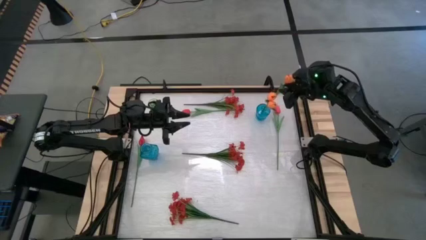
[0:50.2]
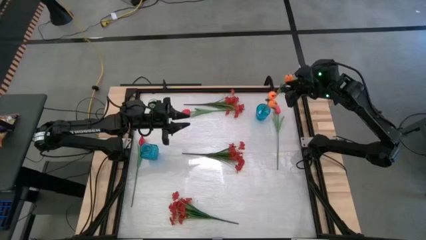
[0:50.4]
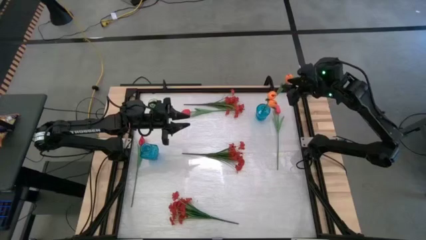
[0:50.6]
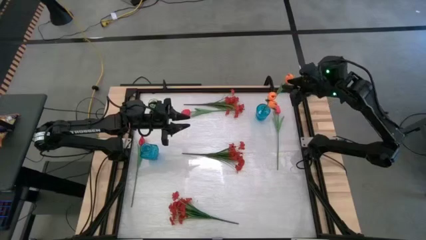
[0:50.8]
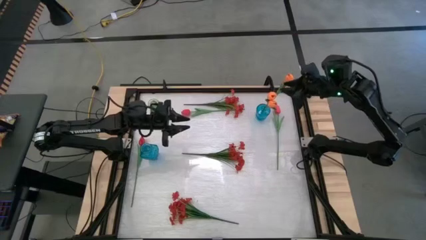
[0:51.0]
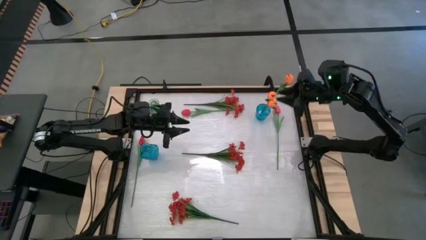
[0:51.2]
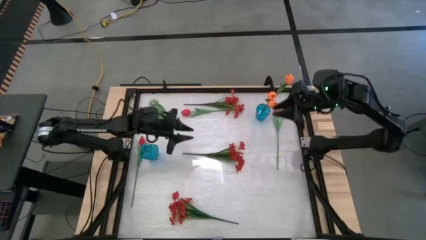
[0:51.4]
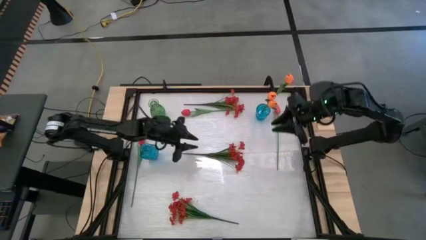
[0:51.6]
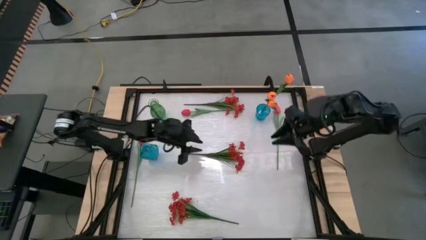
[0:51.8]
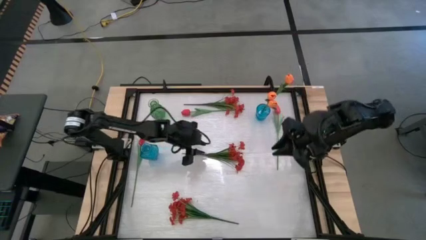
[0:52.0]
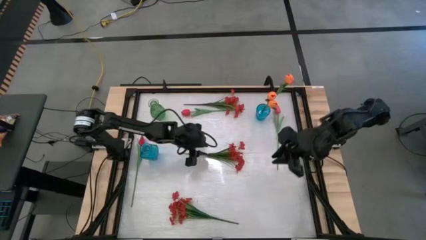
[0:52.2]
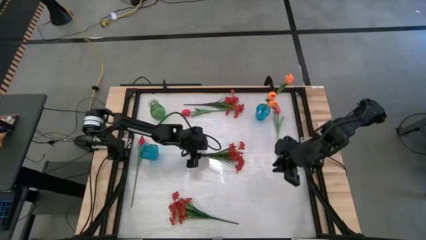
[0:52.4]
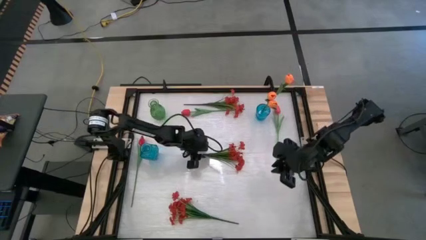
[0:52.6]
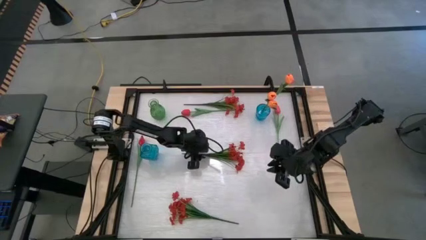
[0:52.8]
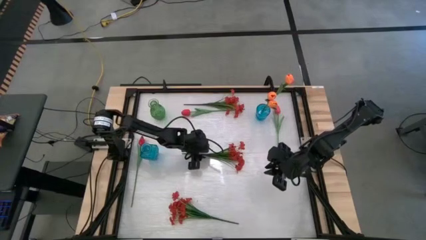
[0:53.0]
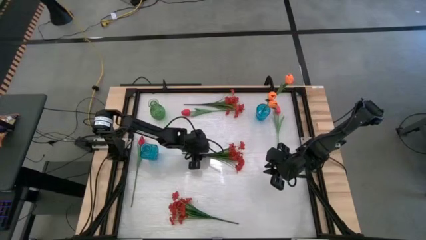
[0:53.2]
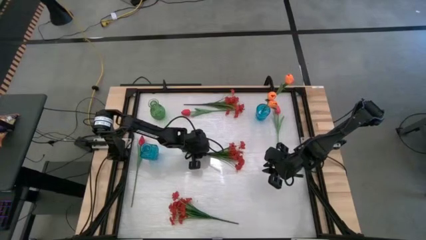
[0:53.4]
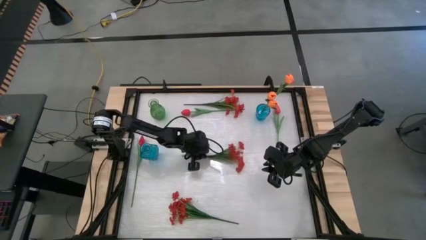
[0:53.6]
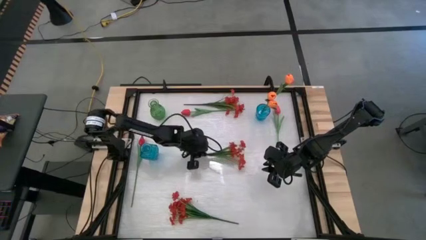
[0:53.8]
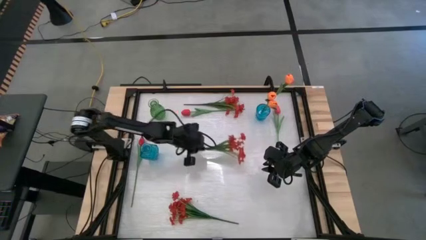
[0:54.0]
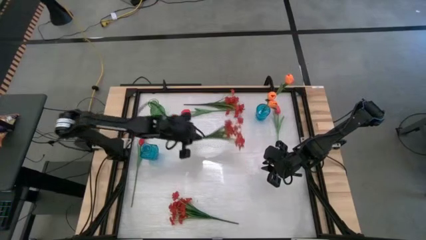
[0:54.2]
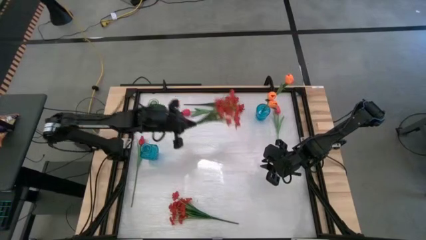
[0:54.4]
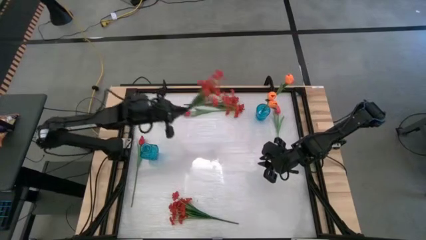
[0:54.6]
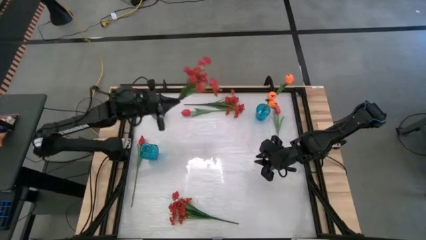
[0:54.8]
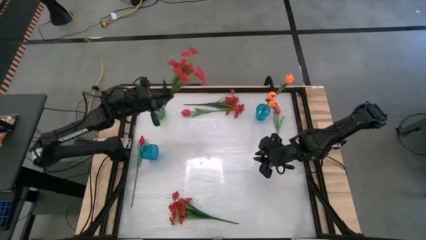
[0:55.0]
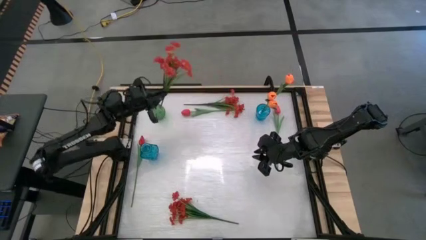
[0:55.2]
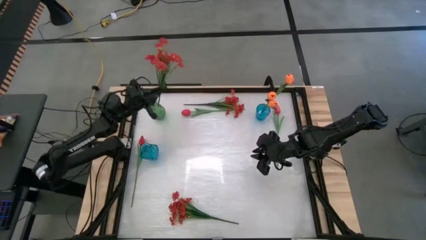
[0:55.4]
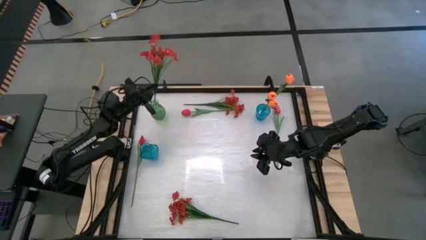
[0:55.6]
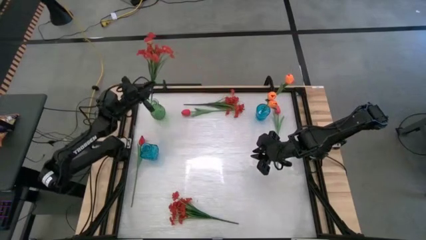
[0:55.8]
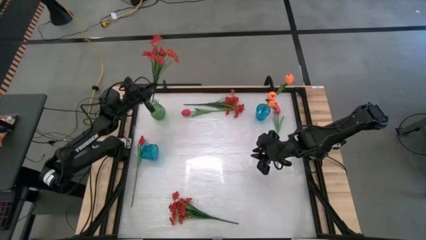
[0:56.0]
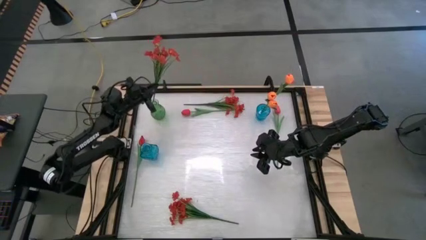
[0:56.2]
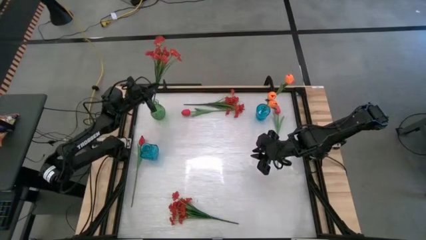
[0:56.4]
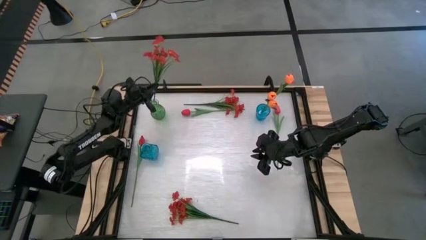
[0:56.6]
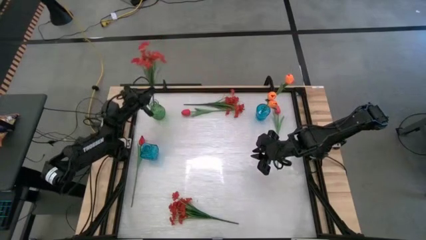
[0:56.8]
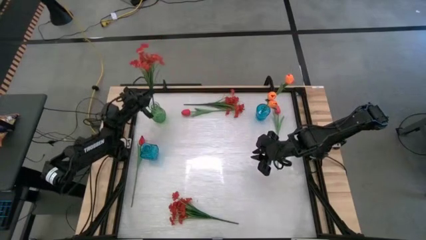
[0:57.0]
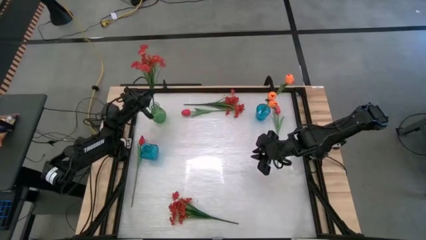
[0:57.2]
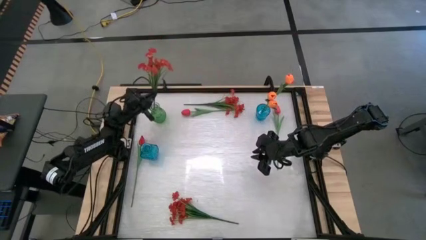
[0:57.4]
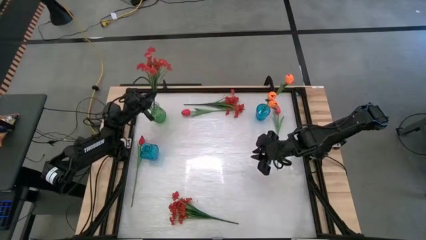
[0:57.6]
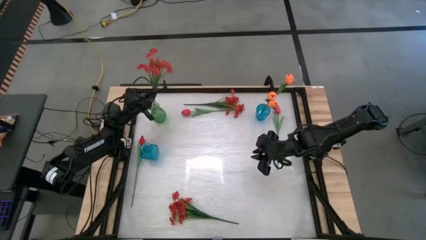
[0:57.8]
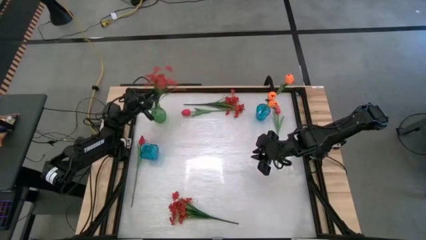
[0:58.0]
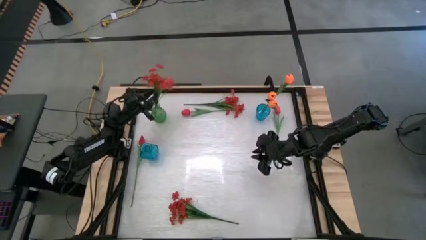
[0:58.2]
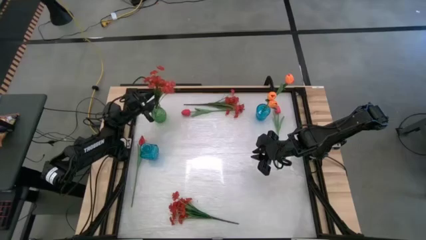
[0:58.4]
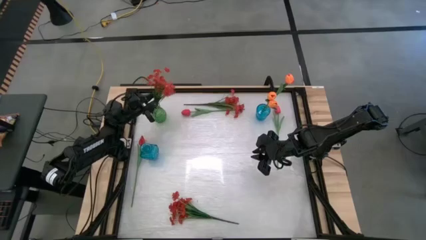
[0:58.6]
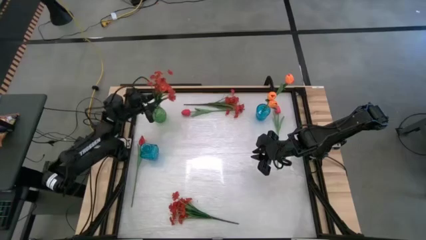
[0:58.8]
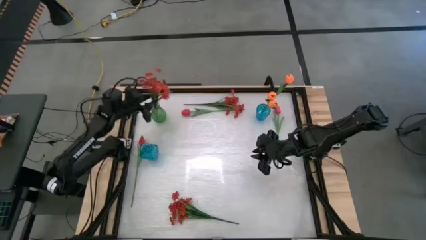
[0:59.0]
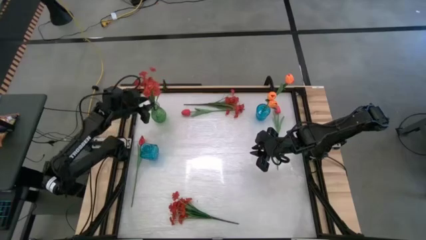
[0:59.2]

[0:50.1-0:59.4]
Task: Sort flowers into vase by color
Put the center red flowers into the green vase

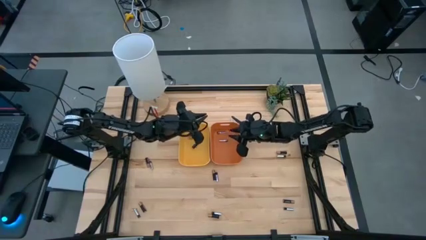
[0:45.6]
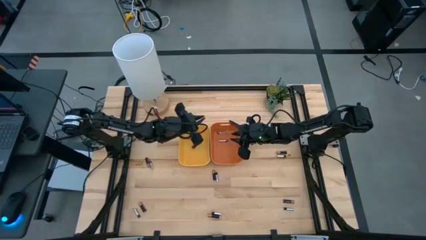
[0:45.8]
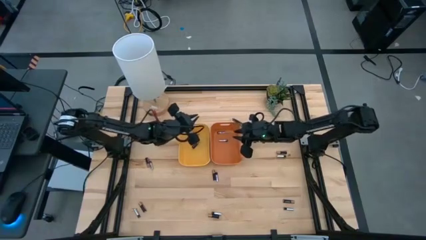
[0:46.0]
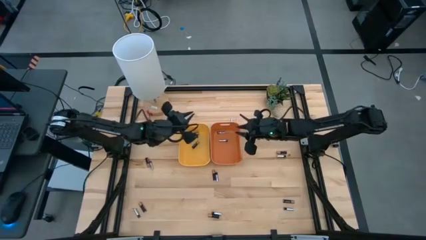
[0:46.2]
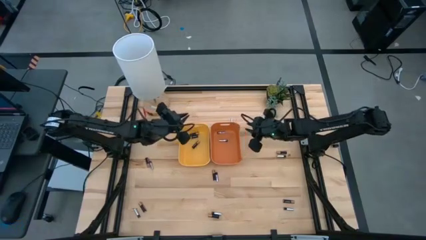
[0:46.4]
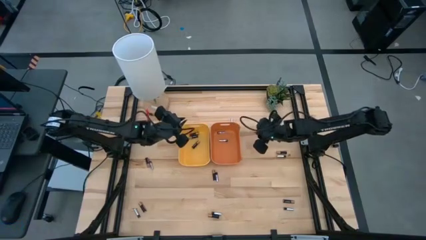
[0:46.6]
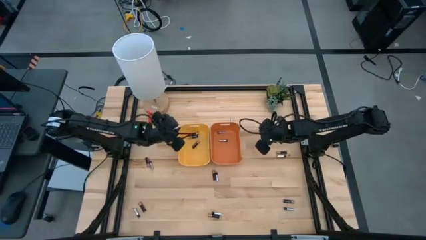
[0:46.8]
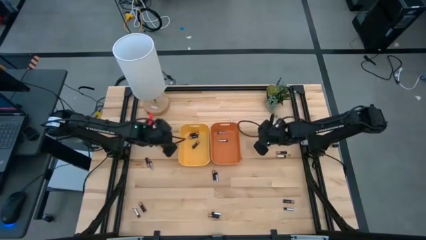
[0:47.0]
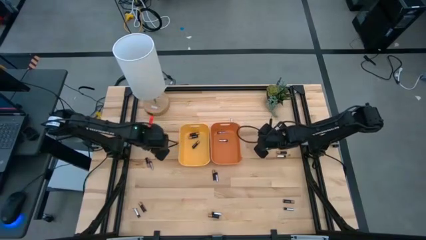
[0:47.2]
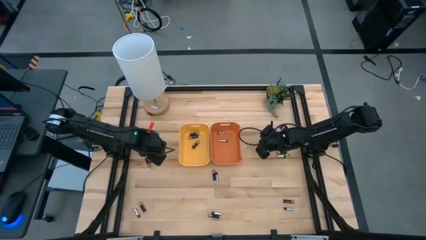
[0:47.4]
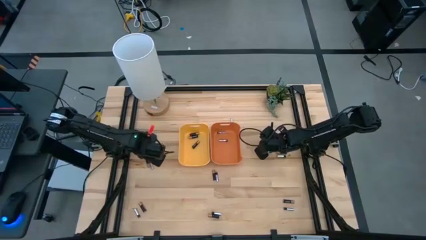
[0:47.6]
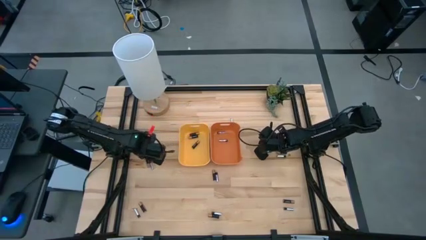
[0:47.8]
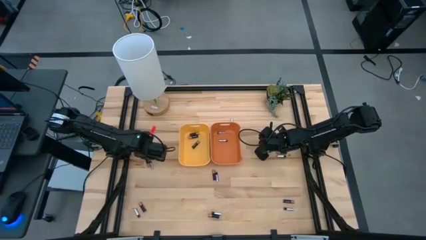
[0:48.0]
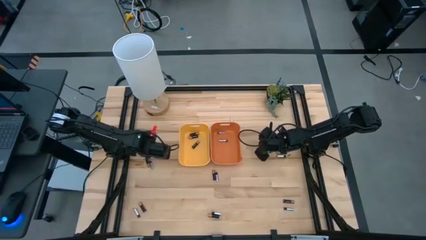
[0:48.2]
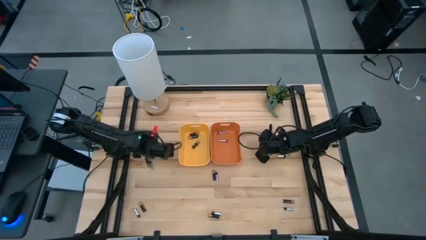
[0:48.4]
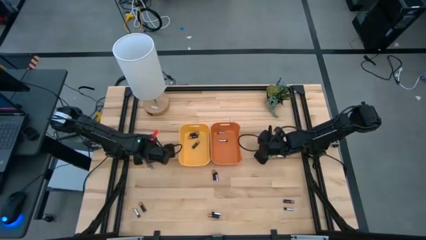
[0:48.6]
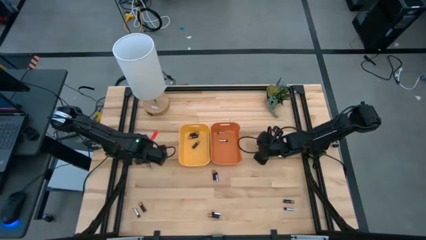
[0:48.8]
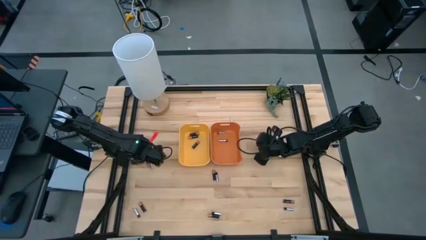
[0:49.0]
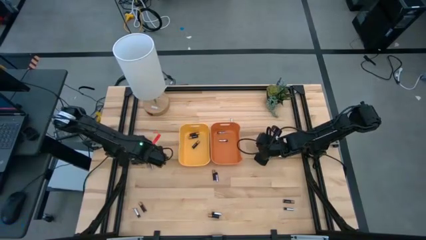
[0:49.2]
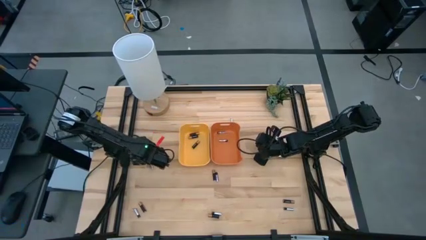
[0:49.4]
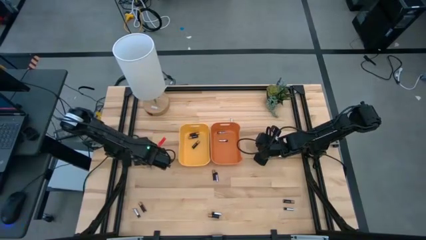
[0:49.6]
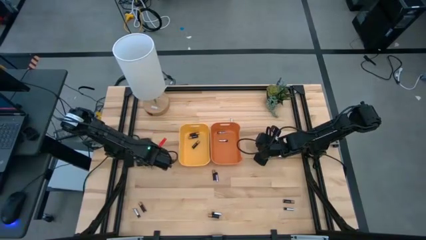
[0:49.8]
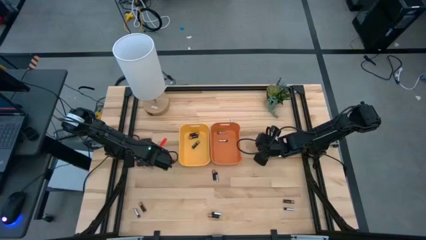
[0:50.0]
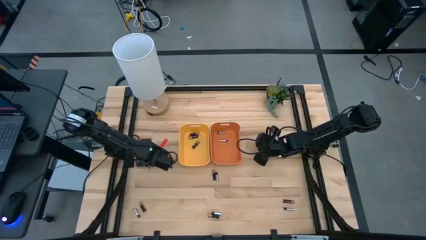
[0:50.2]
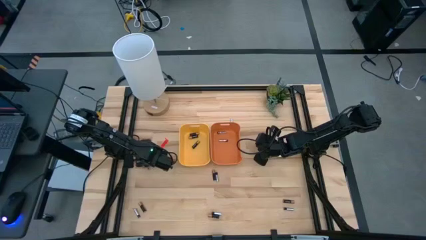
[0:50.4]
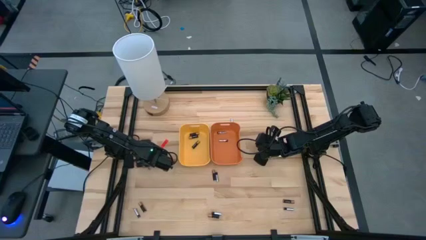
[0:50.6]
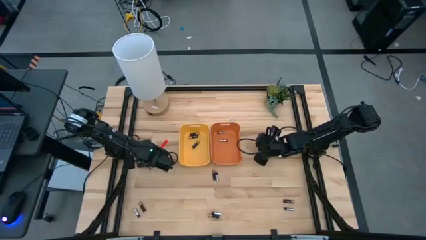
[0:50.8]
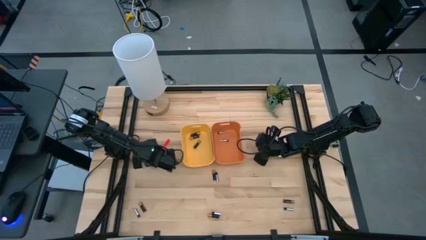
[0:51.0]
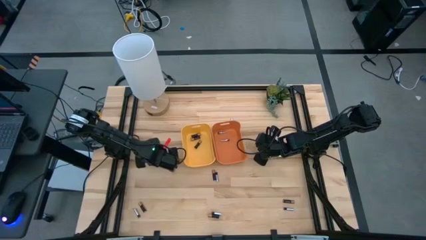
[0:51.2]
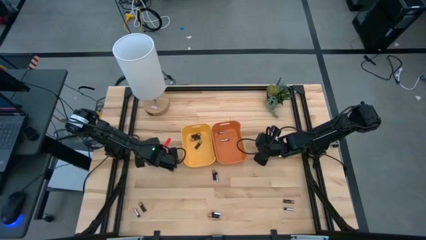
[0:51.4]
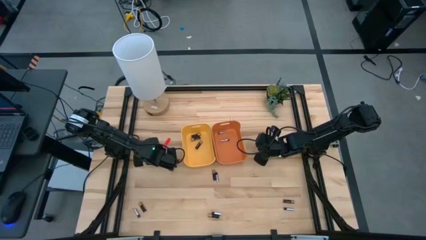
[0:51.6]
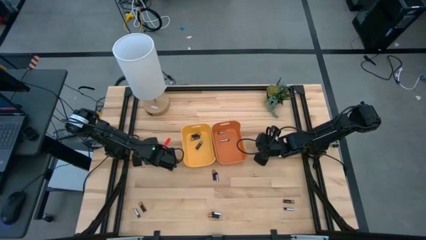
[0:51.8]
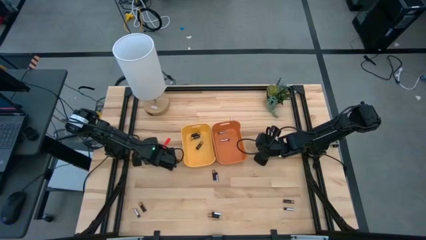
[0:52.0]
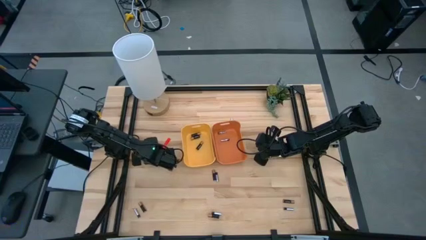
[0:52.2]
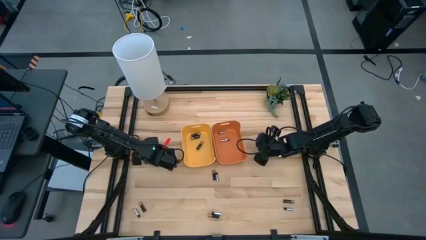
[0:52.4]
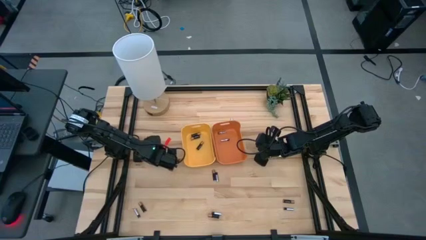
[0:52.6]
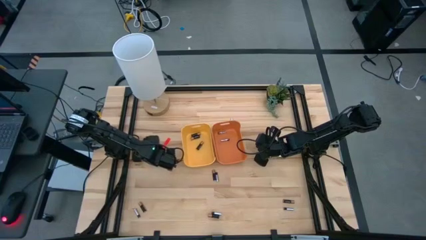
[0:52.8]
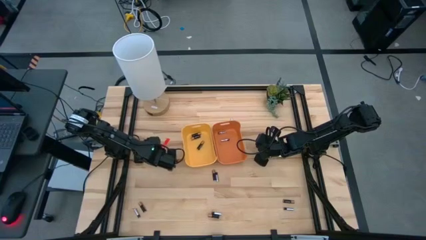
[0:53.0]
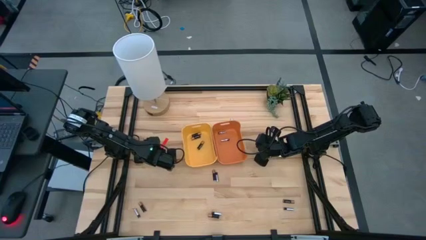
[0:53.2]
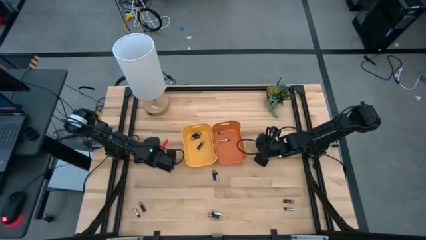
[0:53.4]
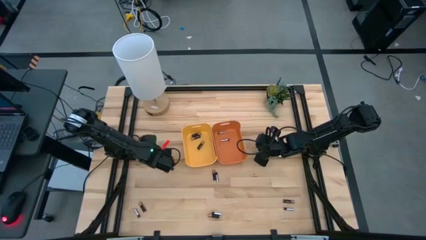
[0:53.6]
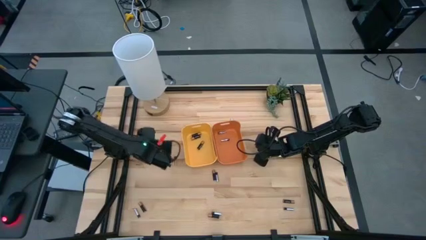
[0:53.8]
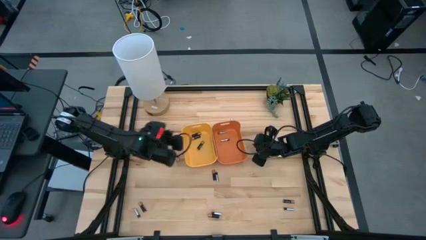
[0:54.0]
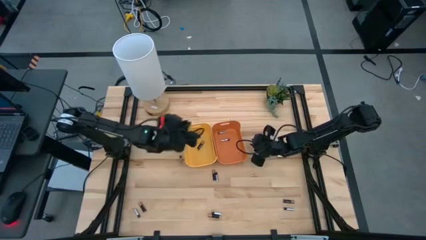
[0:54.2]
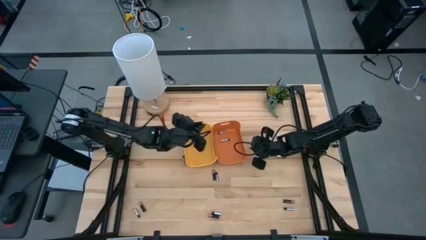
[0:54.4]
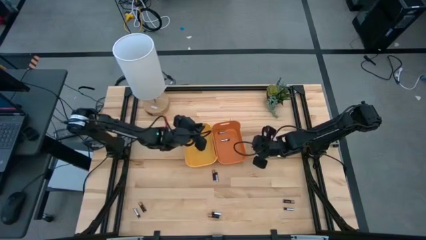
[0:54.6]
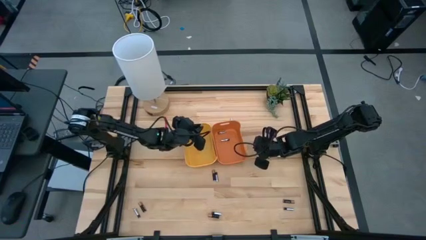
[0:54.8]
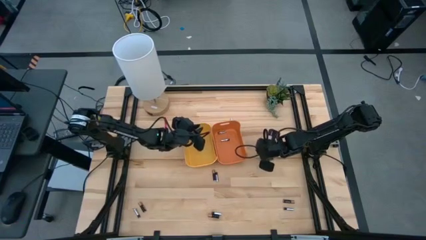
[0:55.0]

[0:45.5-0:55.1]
Task: Sort batteries
Put the top left black battery into the yellow bin
